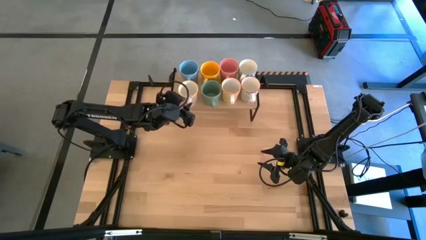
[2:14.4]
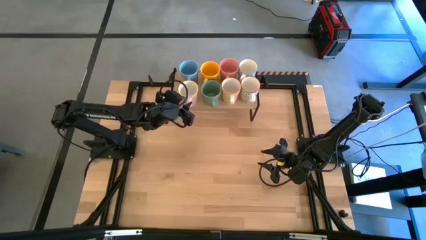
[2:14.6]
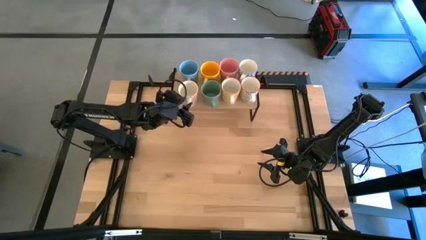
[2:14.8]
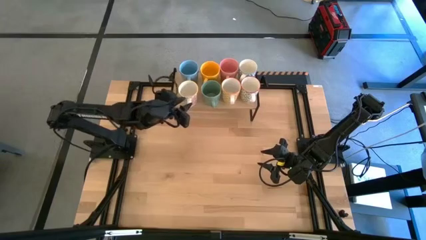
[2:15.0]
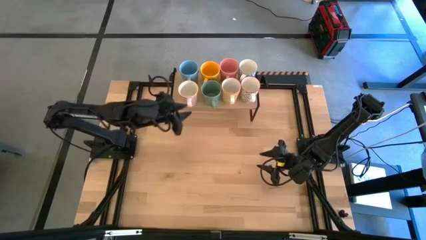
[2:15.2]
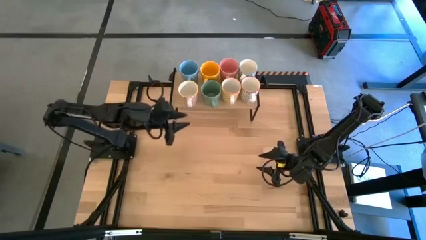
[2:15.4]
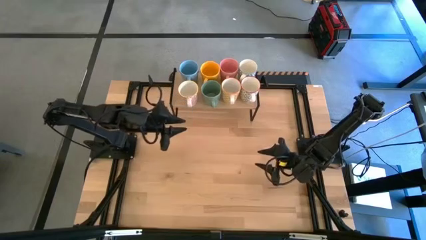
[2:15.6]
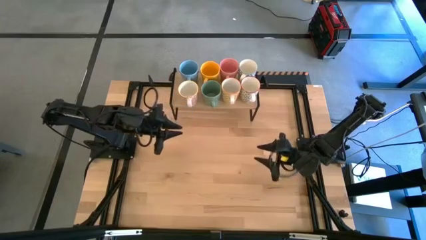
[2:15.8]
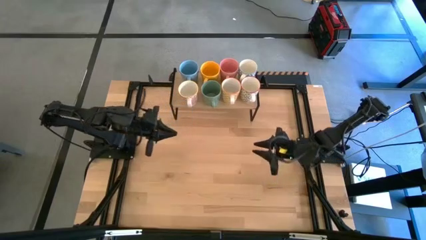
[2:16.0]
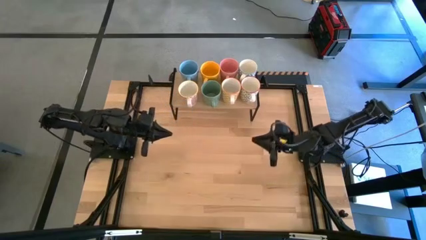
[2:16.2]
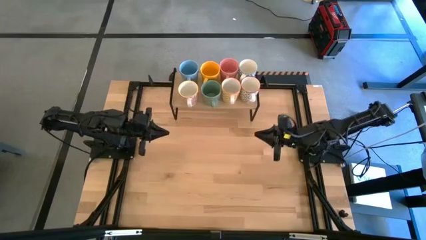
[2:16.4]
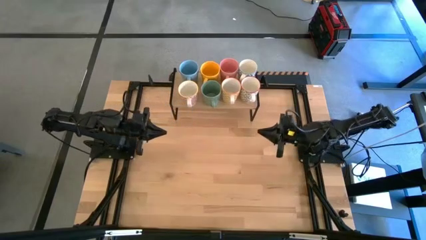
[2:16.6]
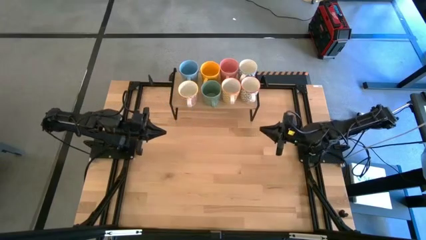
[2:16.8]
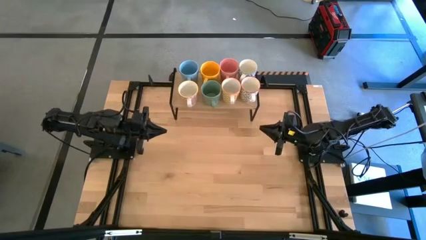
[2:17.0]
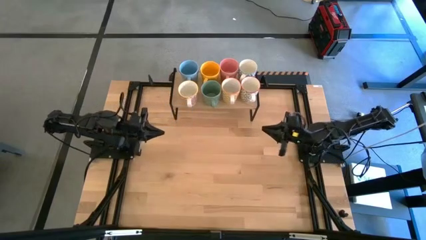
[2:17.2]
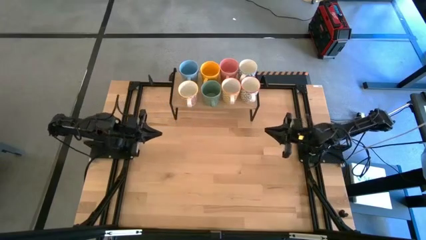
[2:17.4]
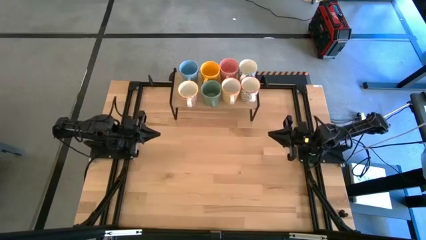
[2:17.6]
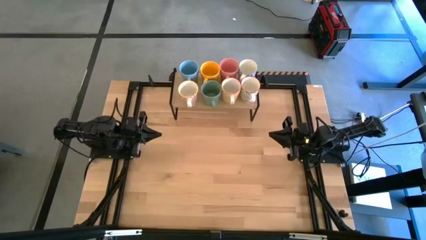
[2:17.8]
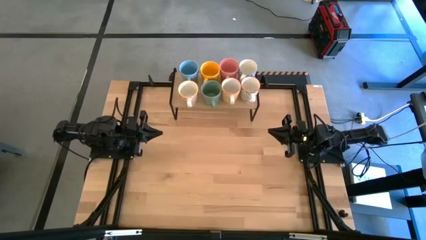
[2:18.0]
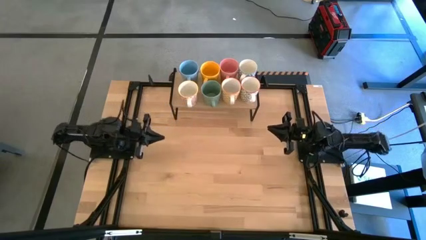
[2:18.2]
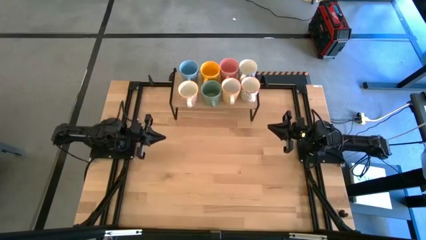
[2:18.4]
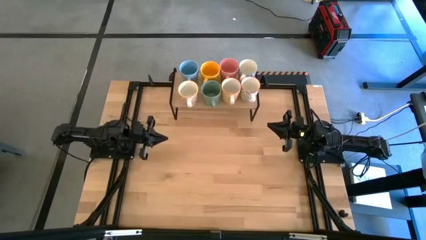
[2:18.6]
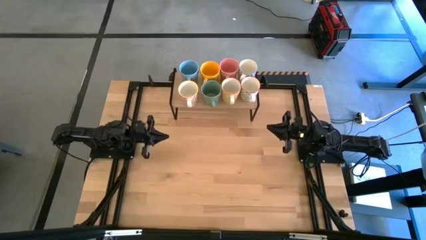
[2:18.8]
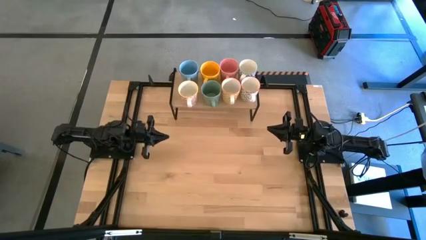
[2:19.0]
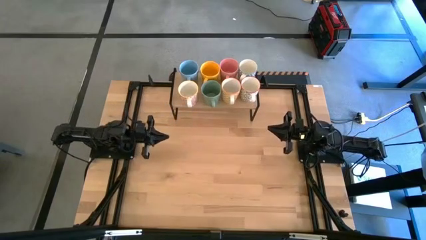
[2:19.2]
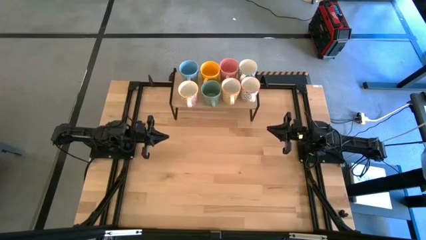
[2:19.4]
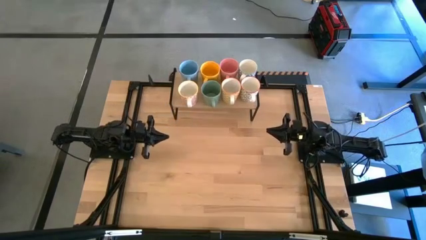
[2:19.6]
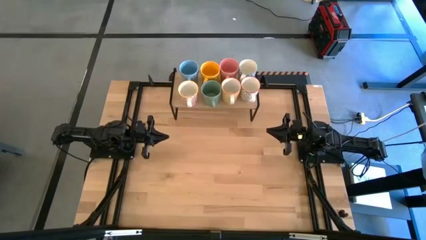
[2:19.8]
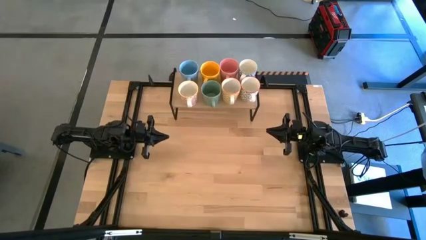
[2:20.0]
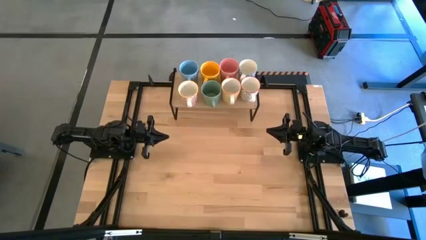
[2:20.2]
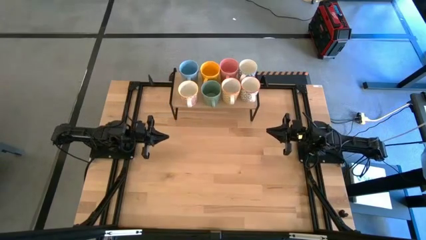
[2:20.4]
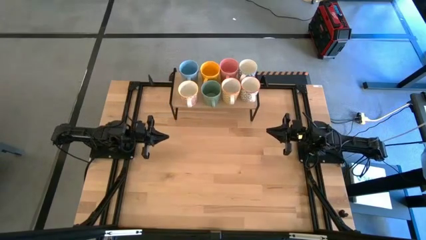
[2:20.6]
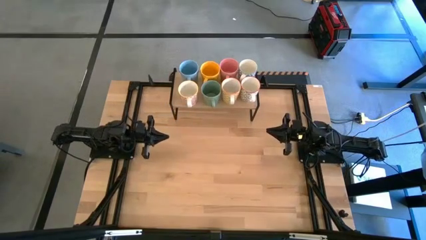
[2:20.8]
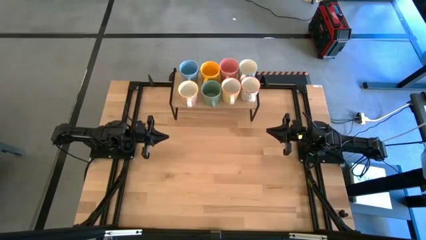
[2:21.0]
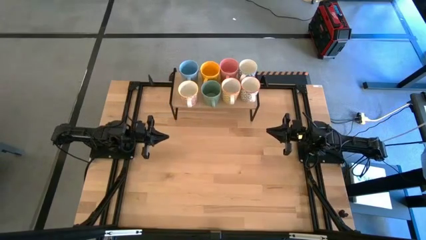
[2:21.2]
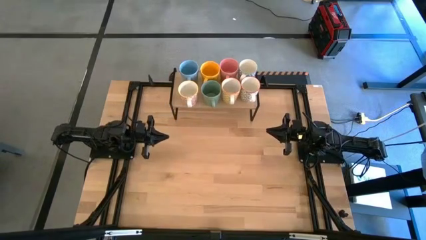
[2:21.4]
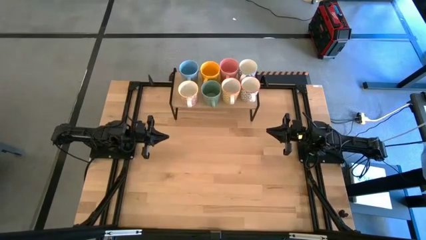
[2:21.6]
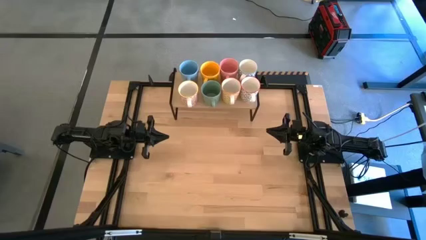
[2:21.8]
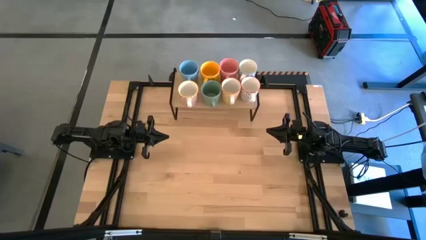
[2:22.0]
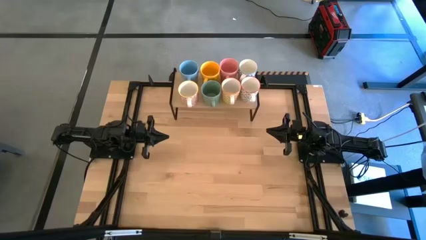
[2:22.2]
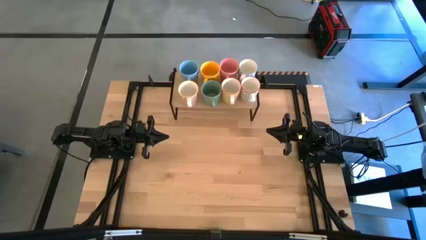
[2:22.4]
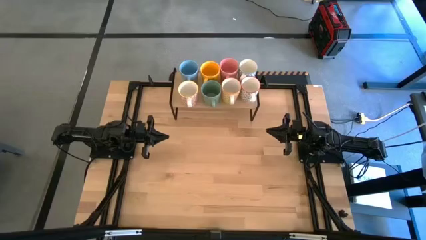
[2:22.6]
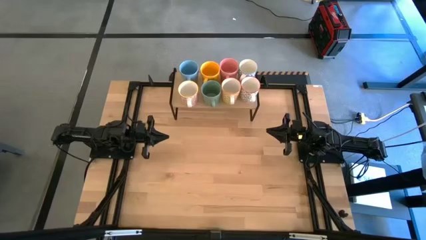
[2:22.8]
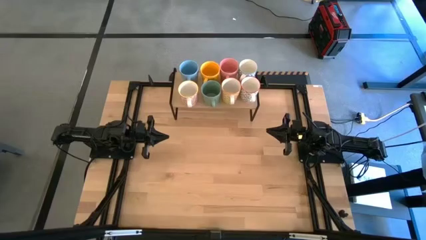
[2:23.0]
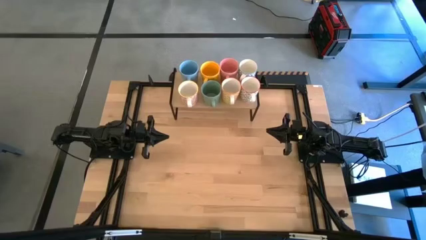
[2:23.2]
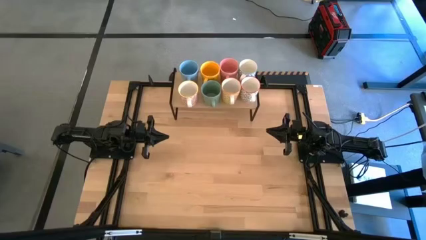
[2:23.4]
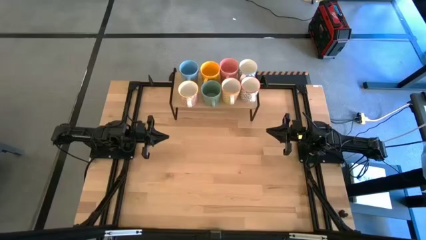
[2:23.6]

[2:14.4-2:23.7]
Task: Place coffee mugs
Return to Home Position

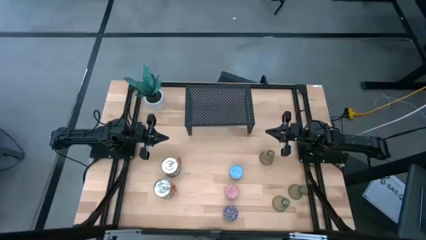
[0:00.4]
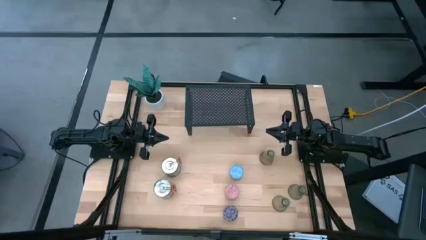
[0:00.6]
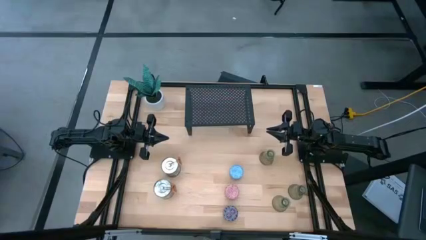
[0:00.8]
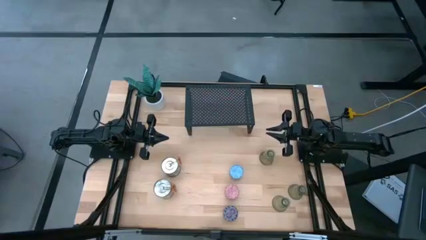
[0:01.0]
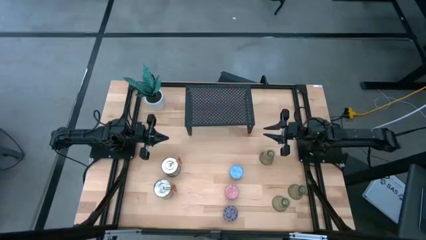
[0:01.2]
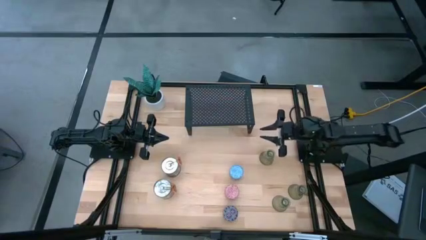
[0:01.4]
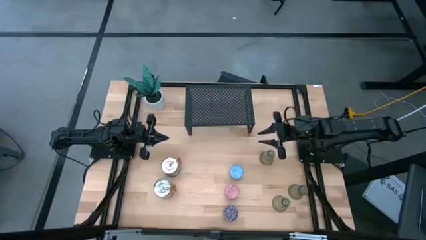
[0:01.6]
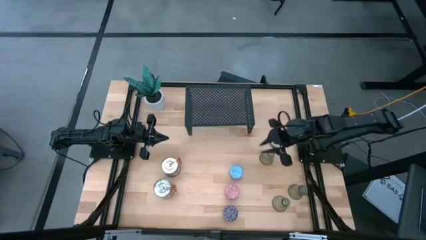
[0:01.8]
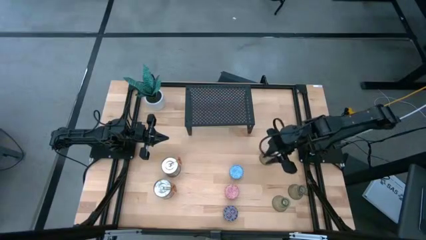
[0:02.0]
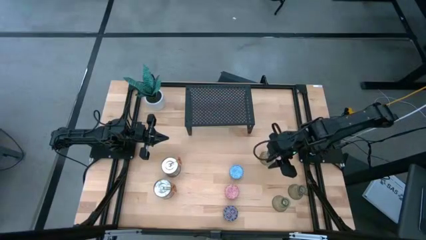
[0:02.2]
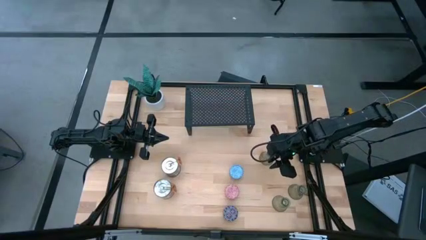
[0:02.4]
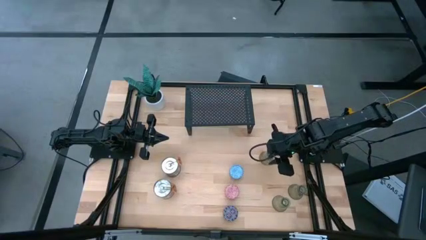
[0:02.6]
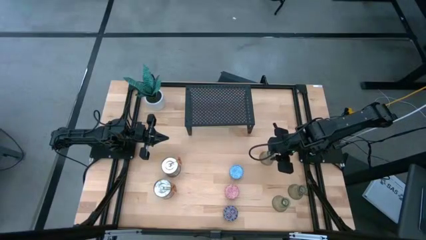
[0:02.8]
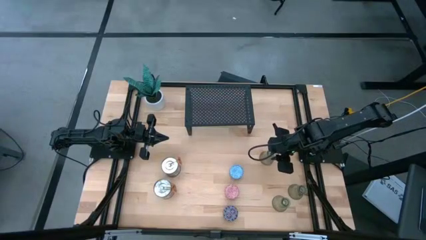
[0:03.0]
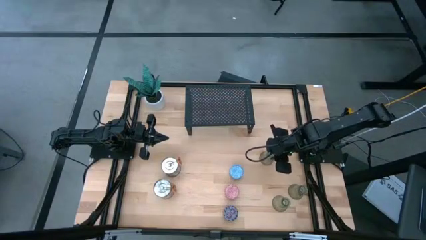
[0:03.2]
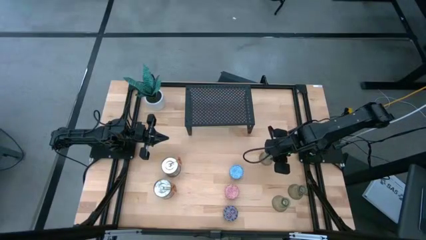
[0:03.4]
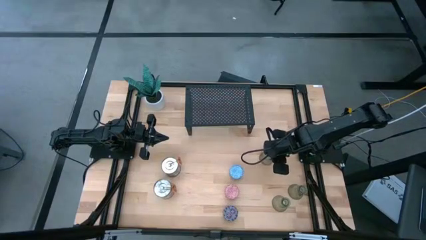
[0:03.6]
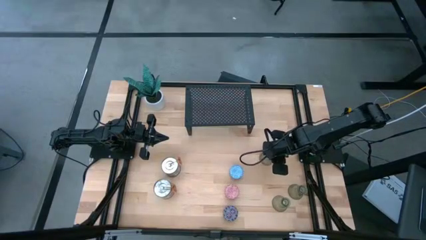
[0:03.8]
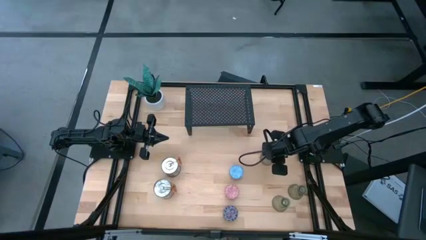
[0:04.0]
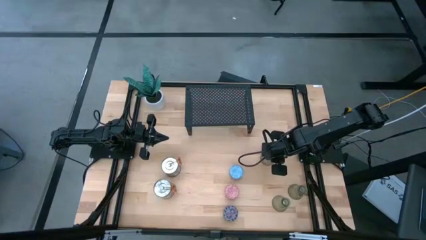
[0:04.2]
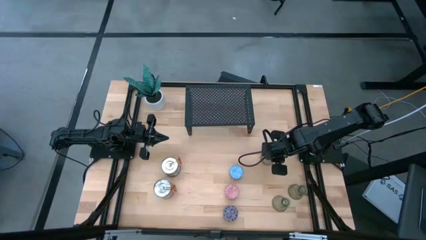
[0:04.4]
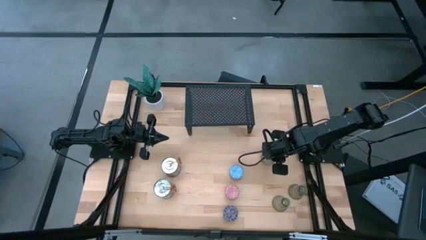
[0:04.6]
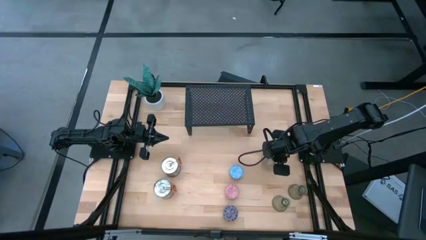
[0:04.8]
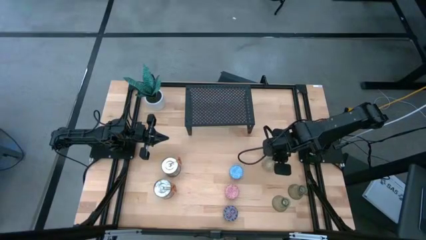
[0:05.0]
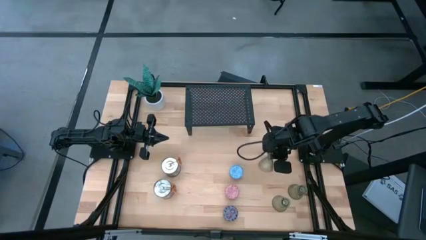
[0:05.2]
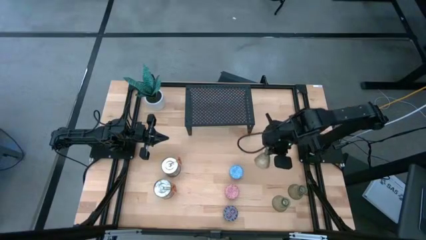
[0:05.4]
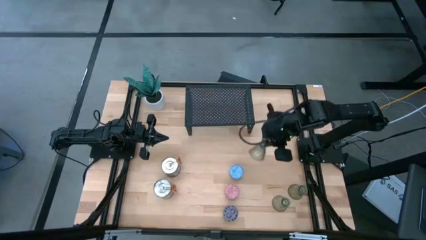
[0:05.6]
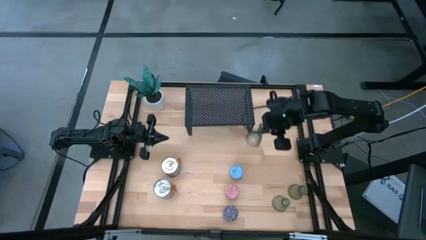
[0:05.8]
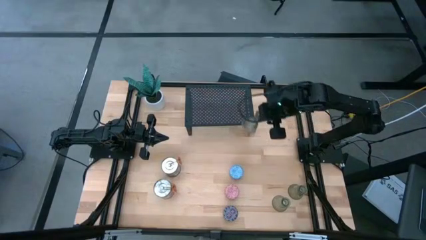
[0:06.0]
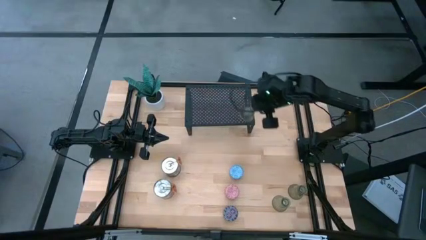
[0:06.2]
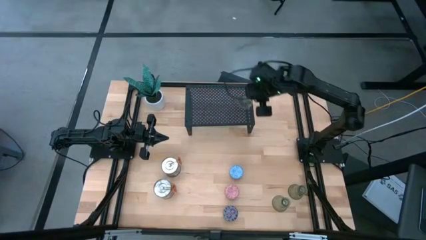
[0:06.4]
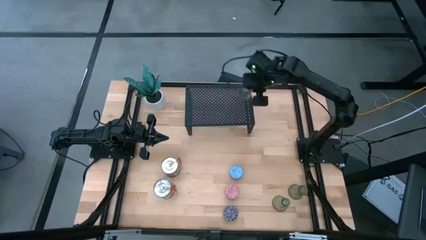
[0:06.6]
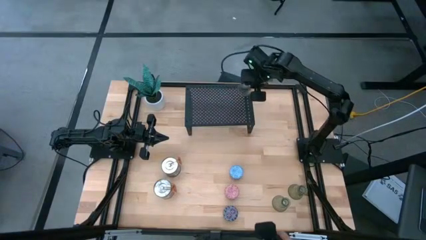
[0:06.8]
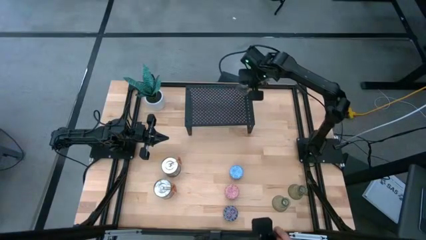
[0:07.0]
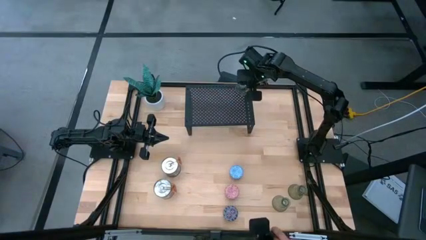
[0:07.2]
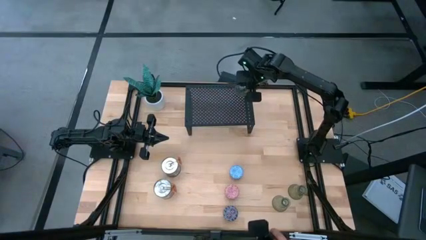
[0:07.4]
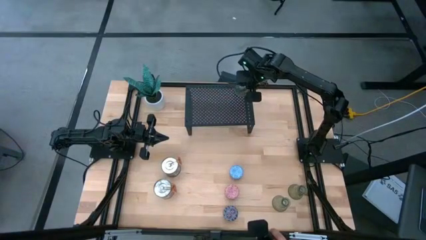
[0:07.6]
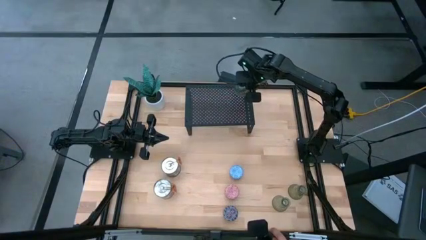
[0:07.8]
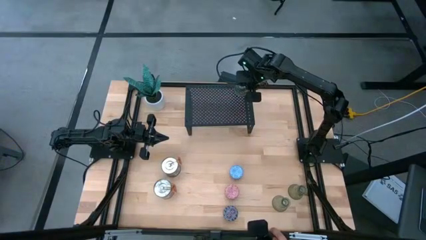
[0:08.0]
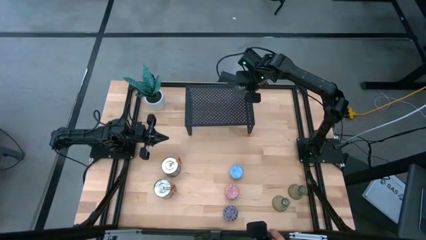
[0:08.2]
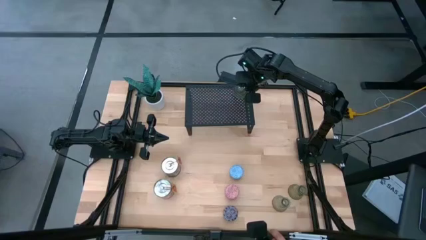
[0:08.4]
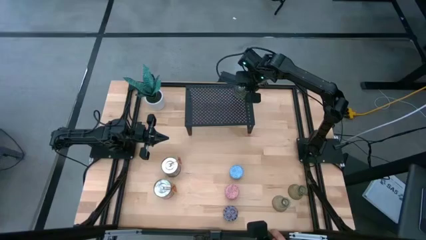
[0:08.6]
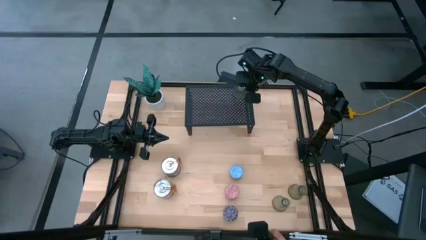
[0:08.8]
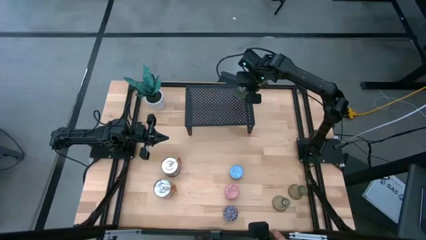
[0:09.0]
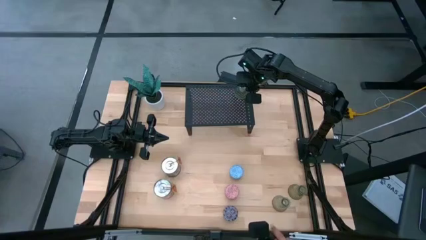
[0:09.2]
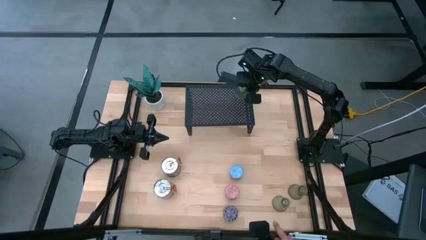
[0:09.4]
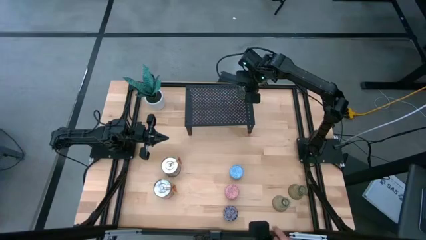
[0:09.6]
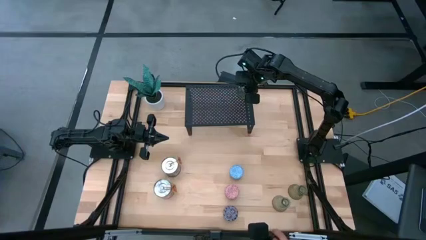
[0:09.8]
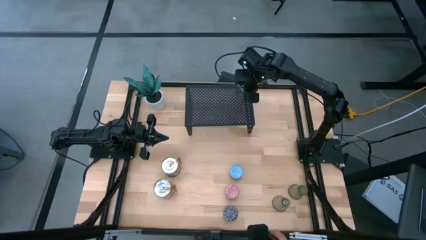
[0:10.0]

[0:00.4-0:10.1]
Task: Pick & Place candle stick holders
Put the top candle holder on the shelf
